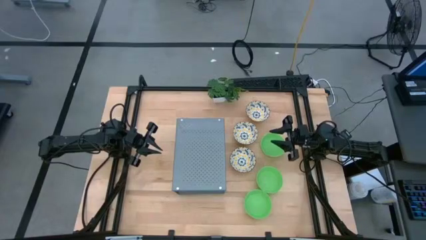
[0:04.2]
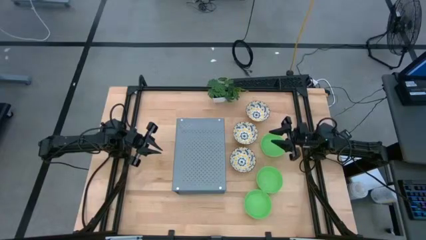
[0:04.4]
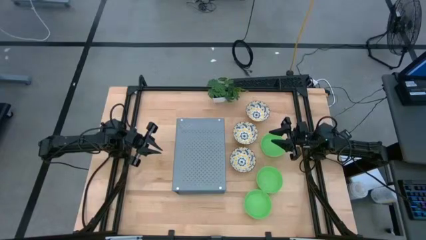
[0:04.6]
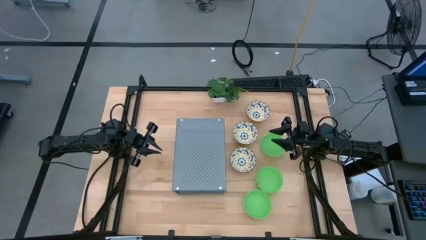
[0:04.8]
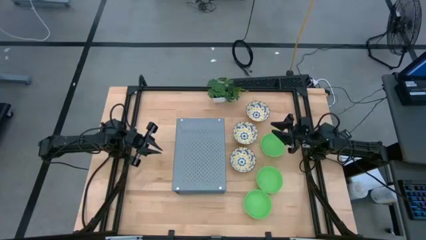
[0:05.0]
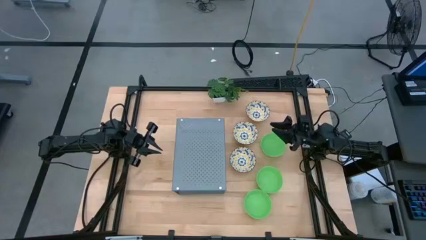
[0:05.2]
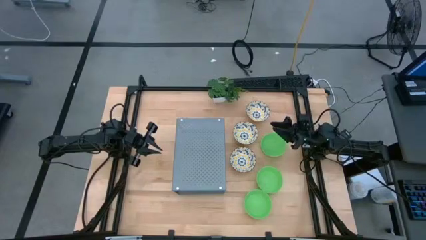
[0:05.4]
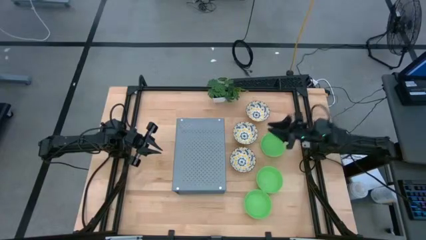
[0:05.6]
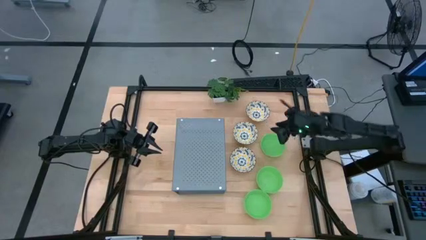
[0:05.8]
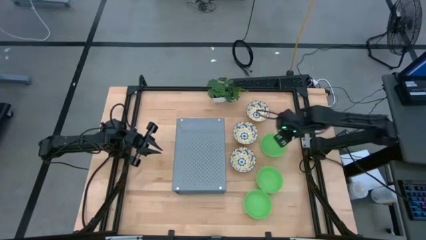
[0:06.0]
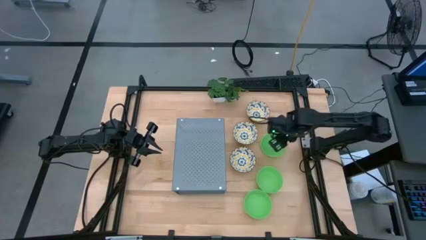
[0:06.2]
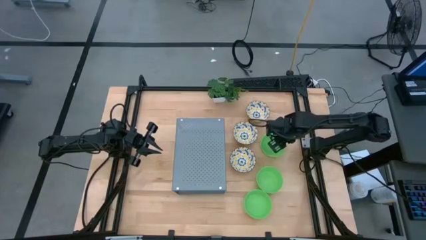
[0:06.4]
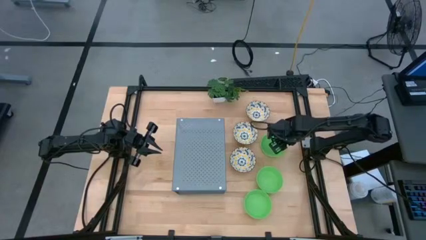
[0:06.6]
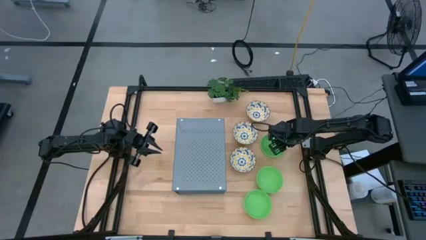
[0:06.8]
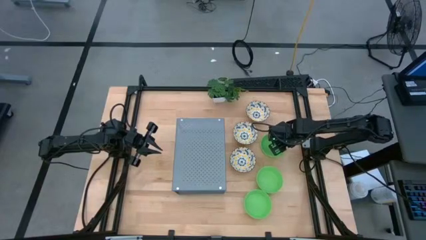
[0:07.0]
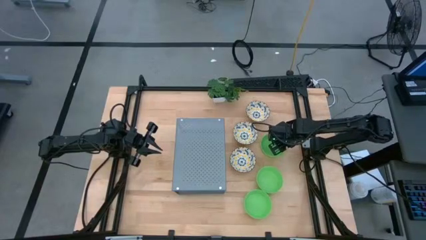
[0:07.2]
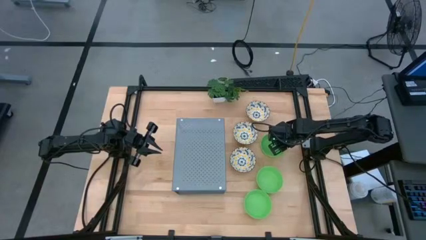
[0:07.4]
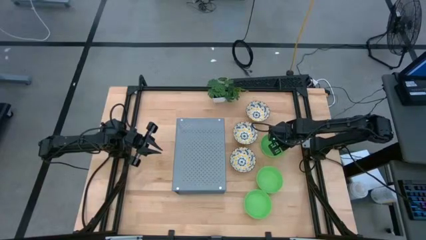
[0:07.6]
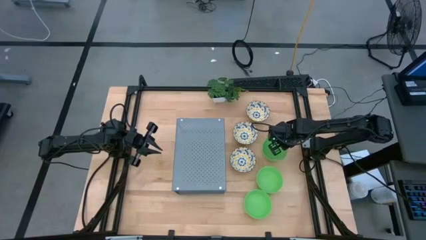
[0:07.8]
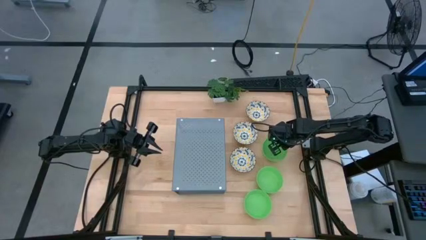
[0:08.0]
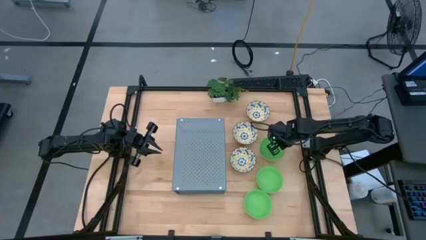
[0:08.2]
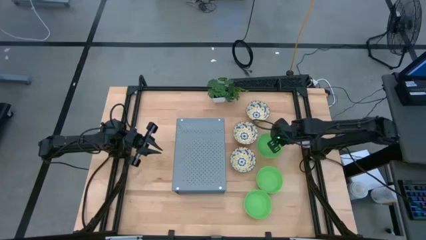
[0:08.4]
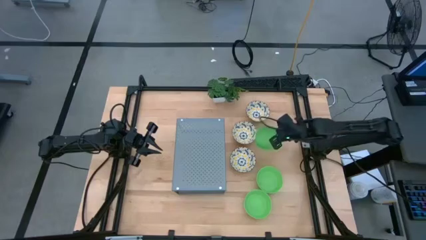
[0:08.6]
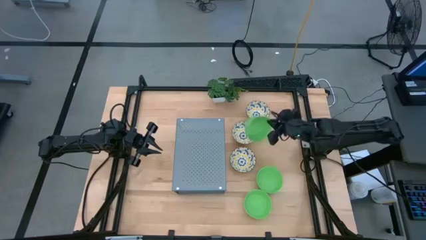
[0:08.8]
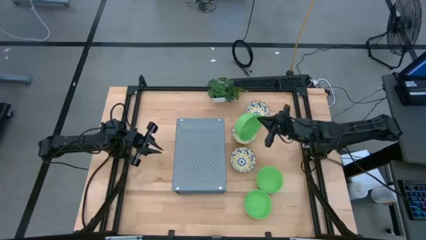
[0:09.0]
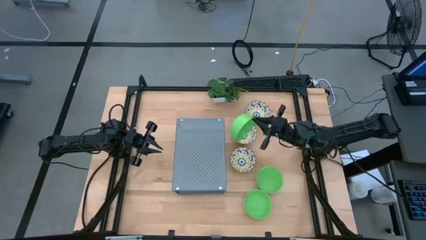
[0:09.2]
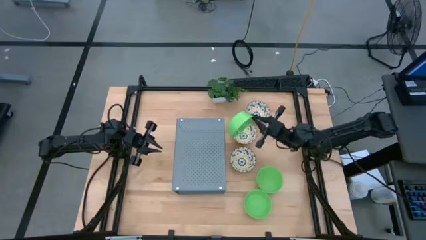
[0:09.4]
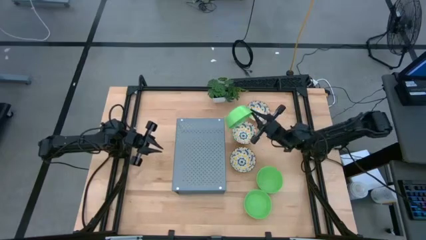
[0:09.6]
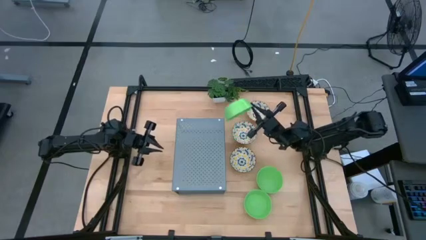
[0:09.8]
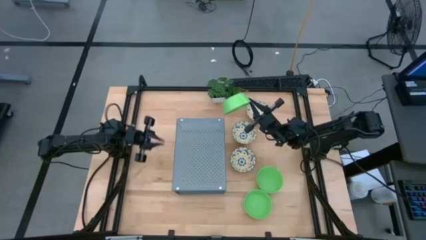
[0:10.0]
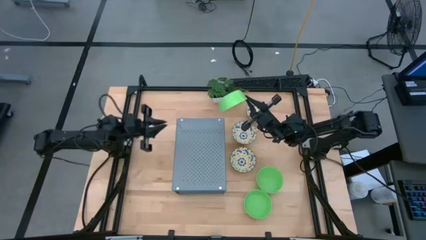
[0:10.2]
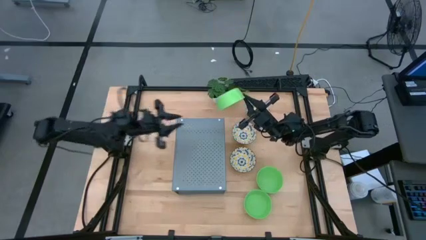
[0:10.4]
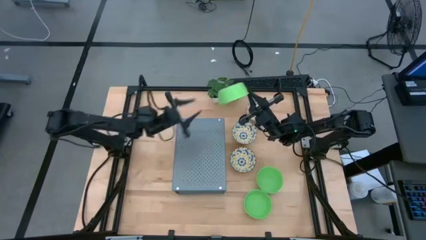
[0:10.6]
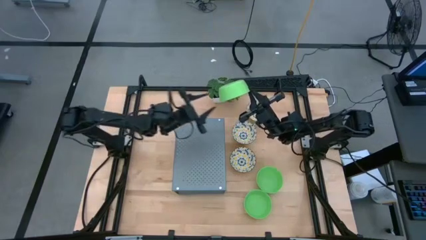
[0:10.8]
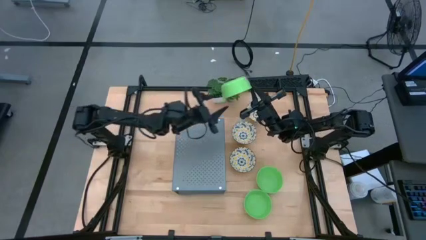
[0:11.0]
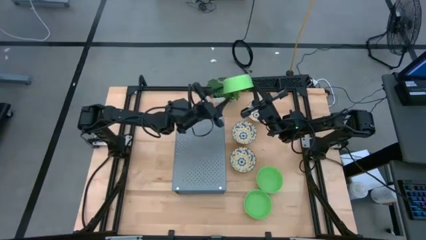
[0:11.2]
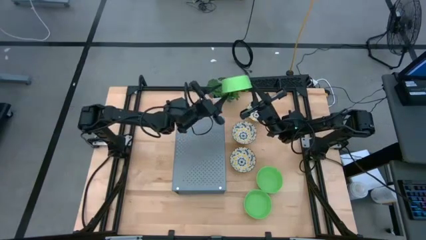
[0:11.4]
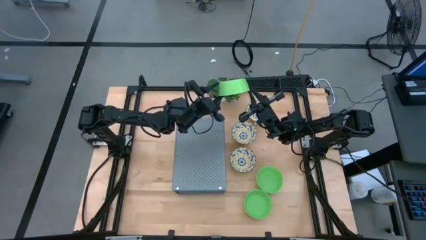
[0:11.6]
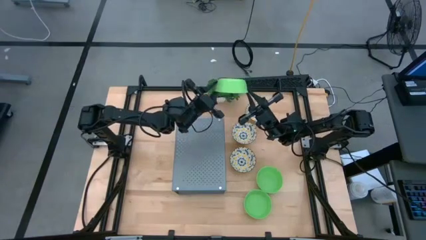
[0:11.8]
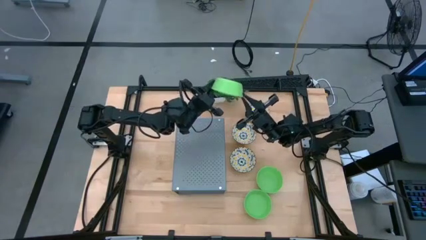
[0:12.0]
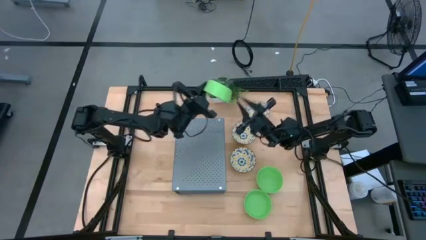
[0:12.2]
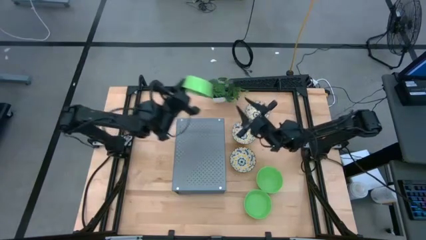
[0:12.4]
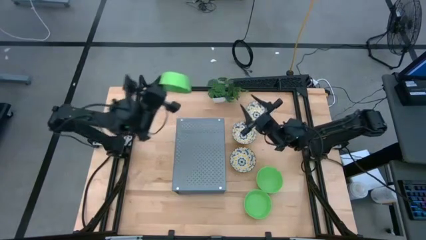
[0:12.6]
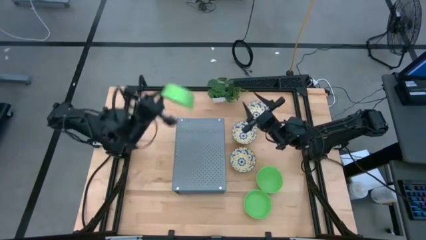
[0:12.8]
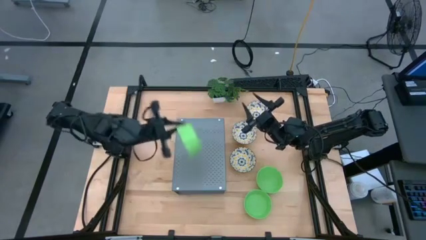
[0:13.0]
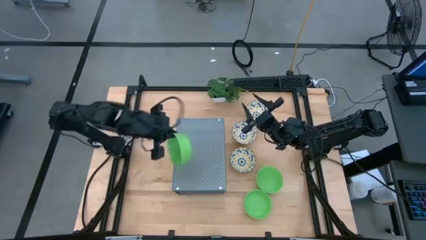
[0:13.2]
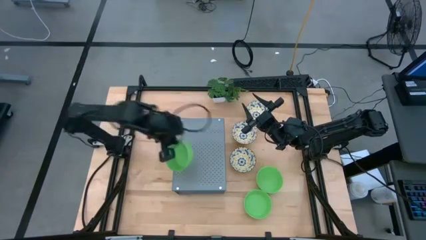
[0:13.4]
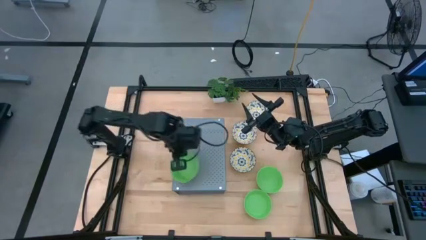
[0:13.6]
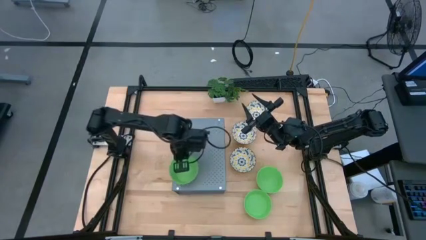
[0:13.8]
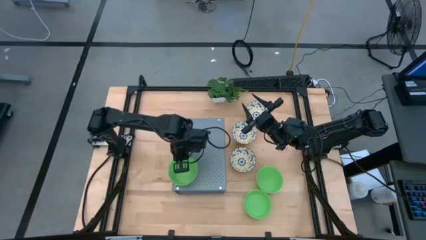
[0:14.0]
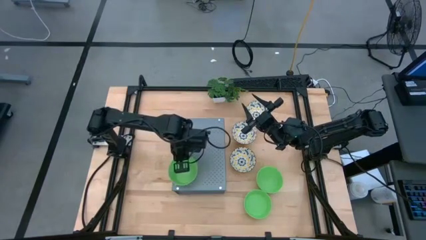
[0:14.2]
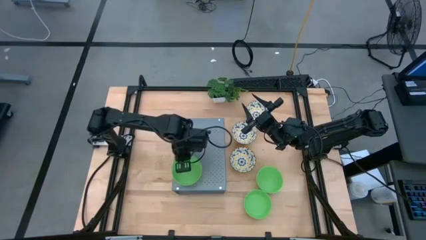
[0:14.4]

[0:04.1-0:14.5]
Task: Pick & Place Mini bowls
Put the top green bowl on the shelf

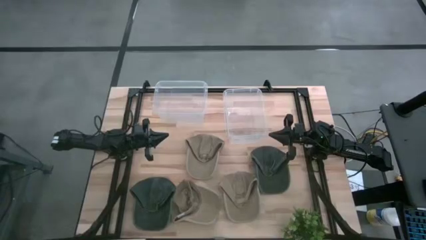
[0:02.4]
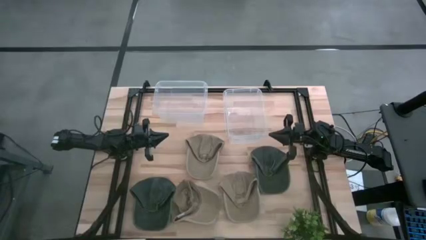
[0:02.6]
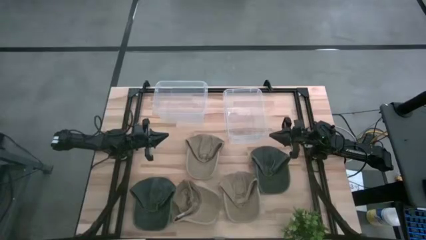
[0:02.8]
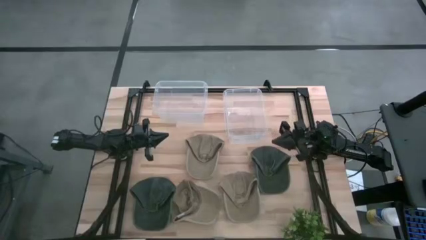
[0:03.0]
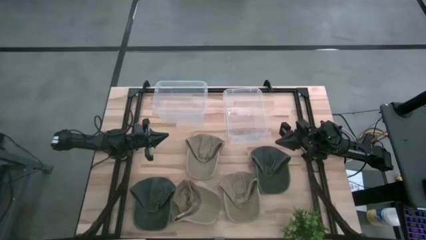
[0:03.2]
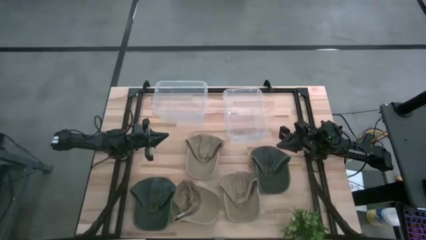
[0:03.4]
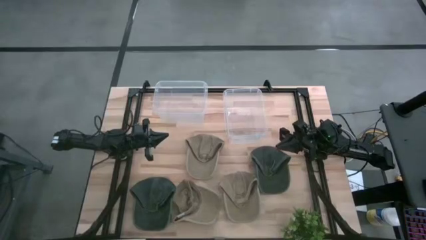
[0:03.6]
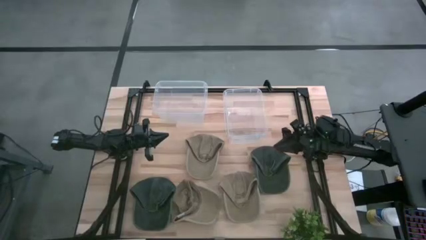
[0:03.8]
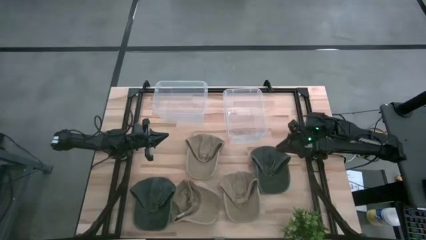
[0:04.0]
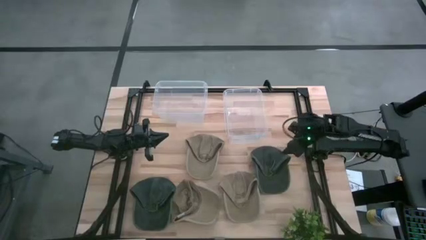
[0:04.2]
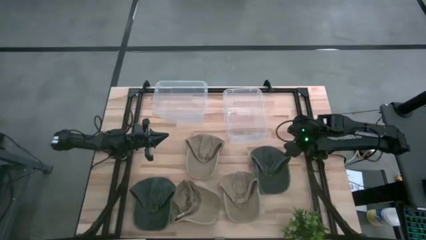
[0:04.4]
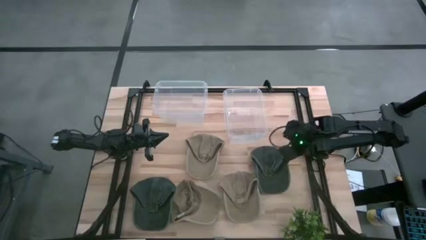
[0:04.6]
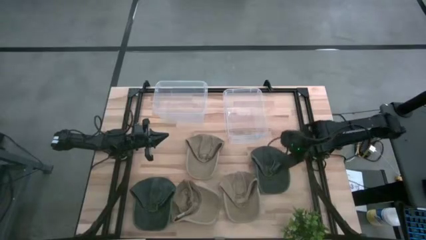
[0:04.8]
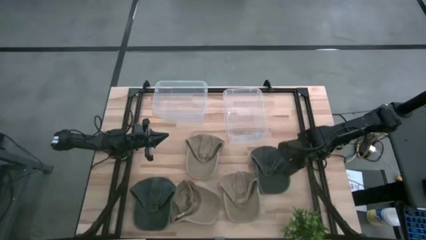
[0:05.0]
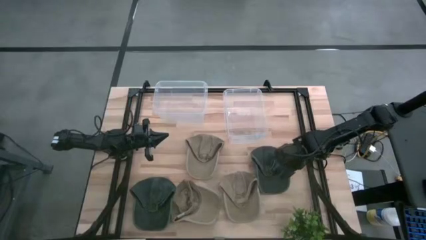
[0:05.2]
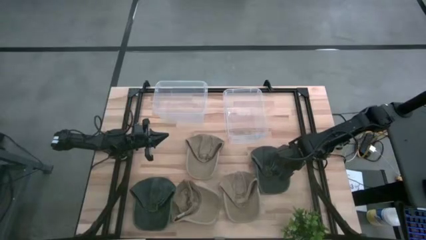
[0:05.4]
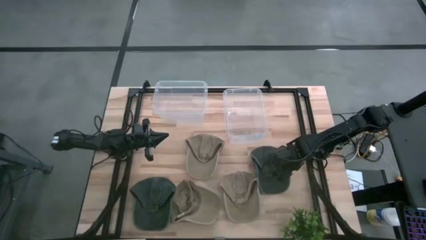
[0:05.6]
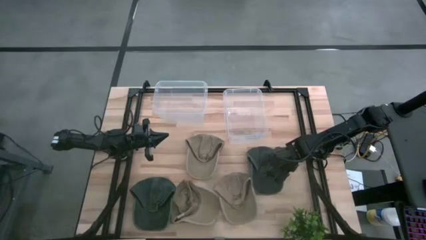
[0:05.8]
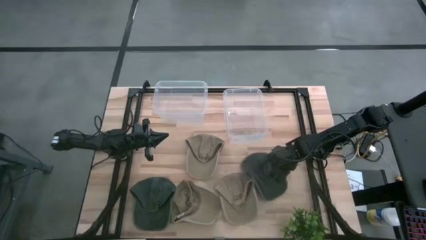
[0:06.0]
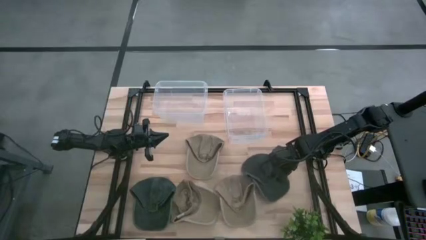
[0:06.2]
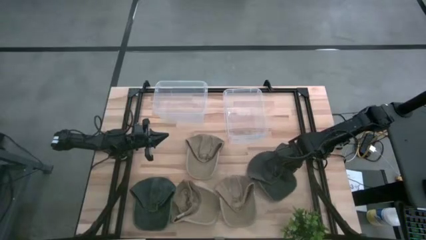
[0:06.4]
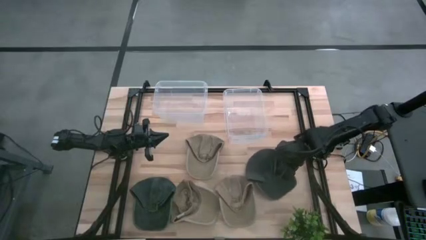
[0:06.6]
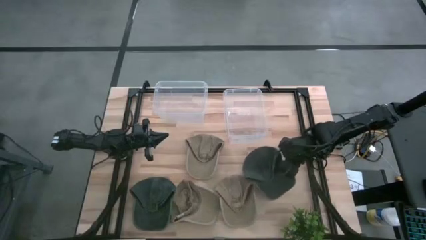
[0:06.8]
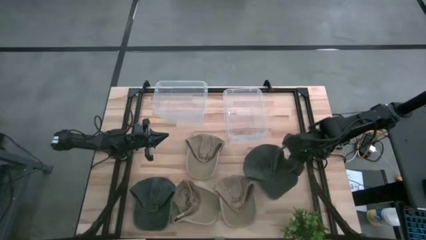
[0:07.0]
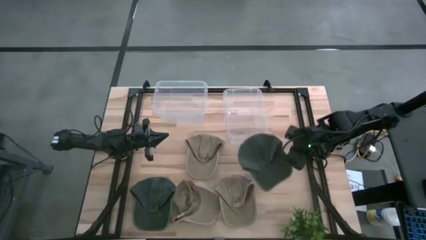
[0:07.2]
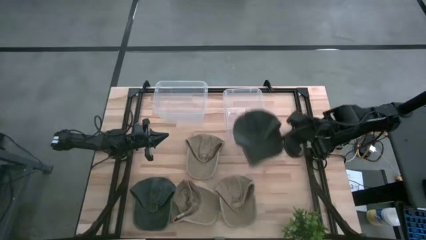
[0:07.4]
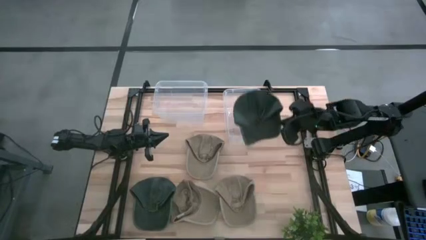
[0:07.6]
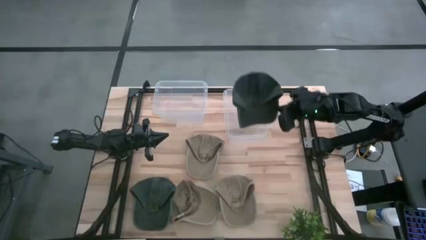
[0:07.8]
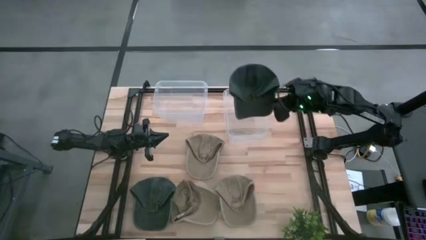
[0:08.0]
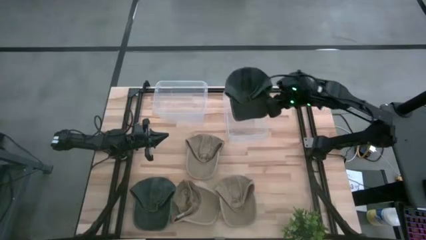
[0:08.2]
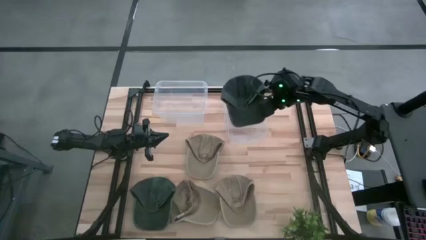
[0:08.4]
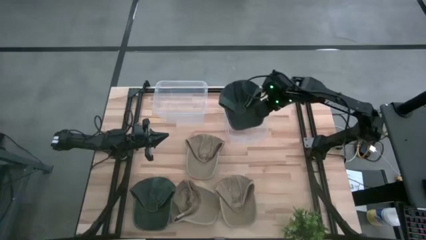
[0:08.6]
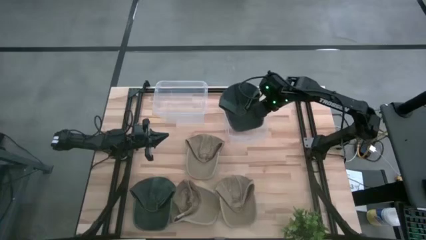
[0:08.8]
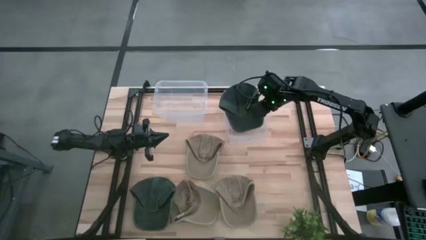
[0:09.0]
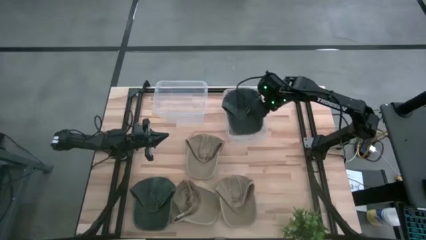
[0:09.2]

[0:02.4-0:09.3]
Task: Pick & Place hat
Put the right gray cap into the right transparent bin
